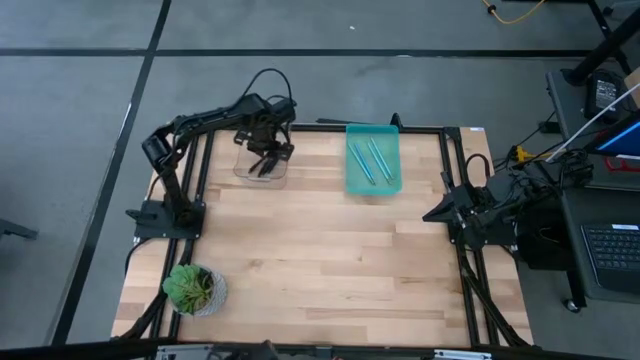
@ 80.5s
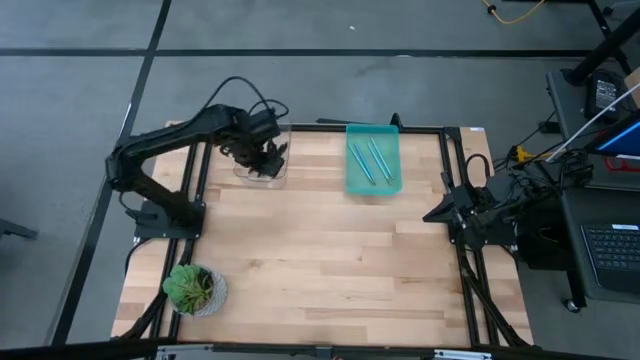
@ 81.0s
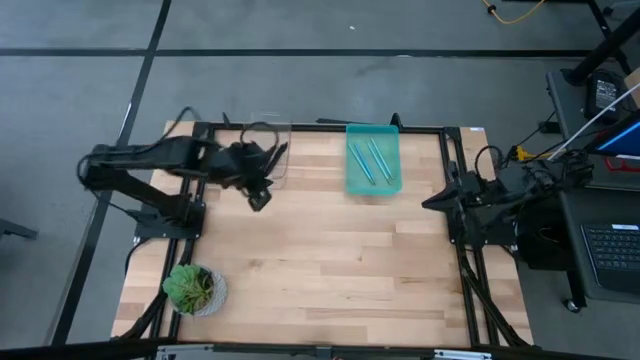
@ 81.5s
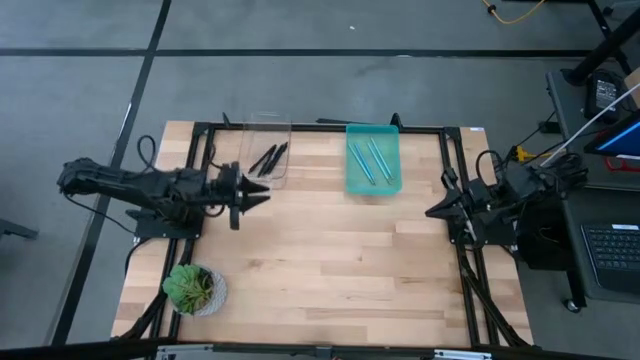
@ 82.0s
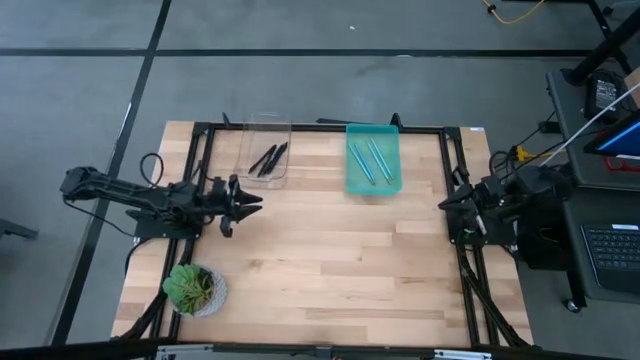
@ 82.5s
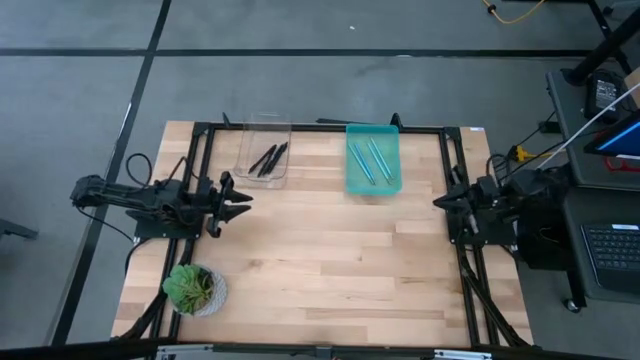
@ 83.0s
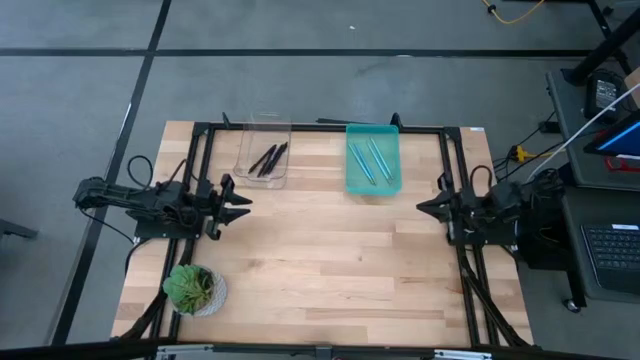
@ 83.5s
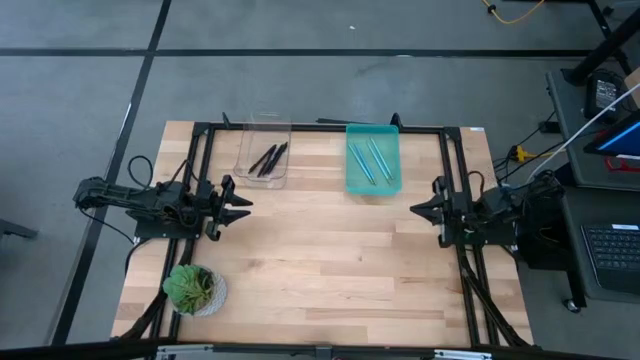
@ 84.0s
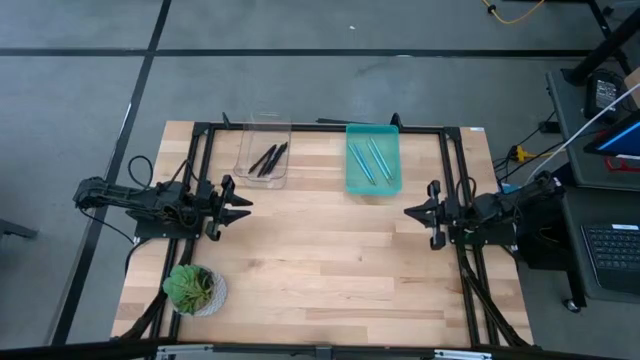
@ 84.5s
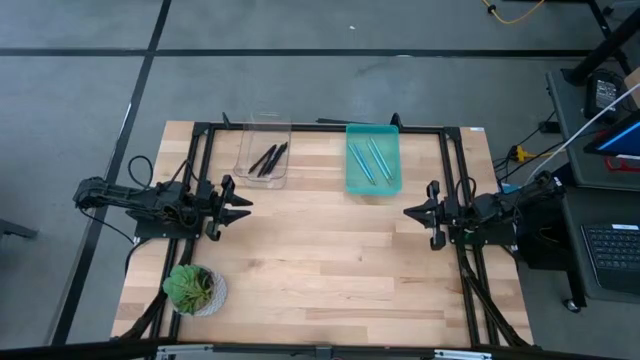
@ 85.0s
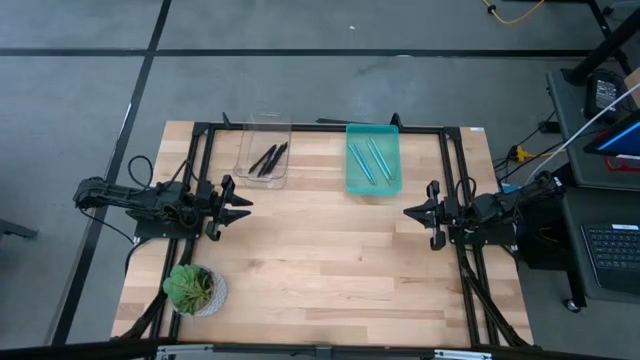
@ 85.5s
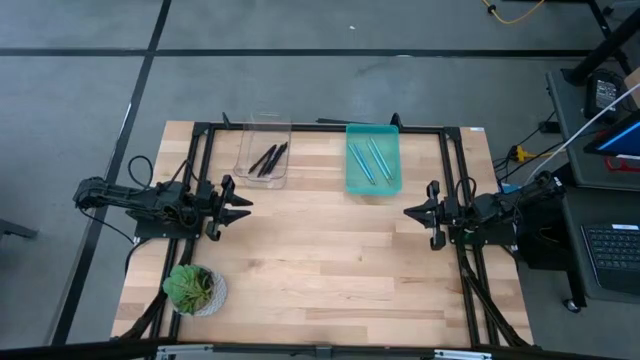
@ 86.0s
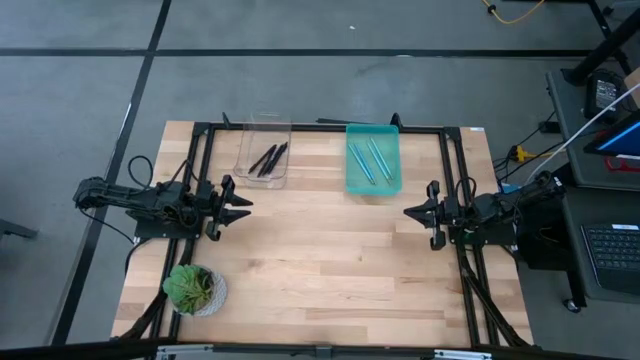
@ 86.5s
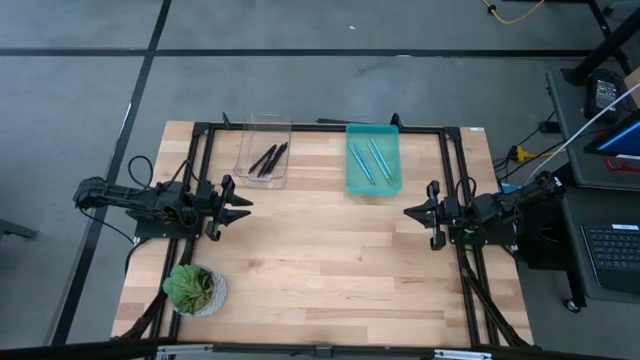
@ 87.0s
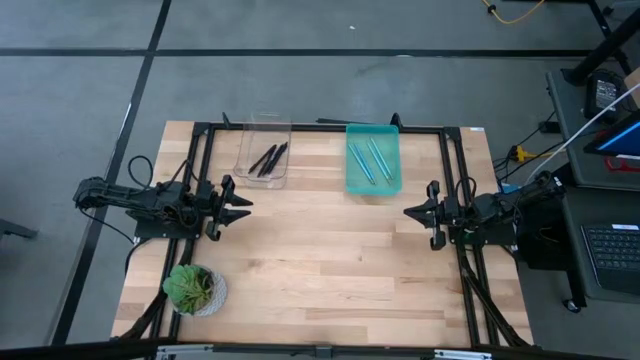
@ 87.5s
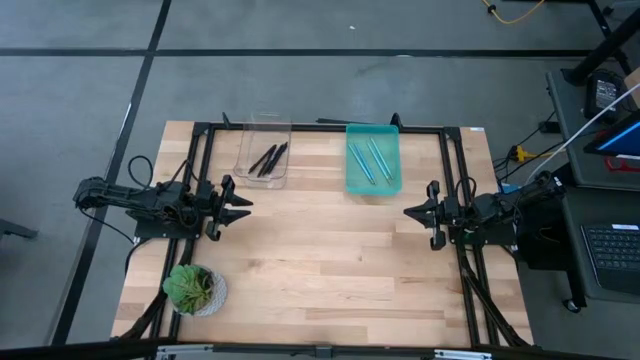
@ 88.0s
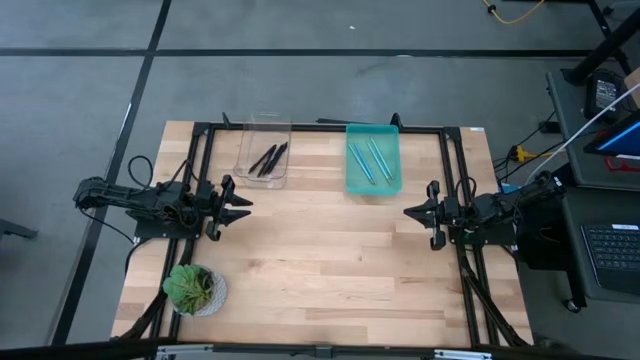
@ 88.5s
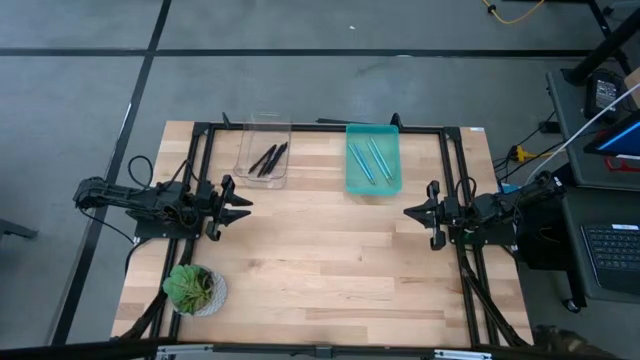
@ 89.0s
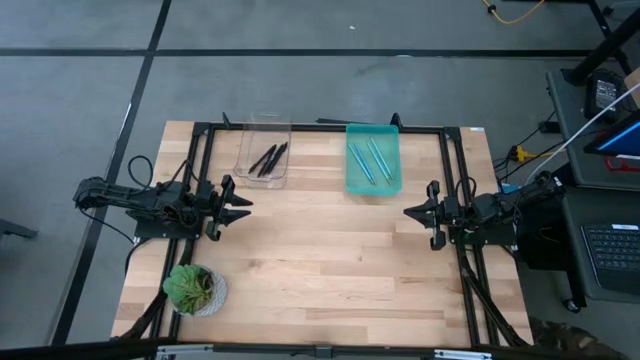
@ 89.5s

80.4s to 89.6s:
Task: Sort pens & pencils
Return to Home Position

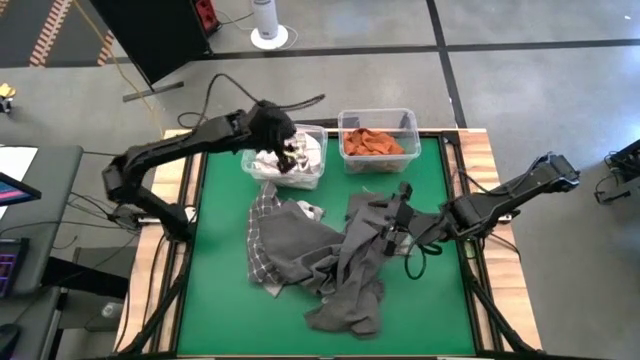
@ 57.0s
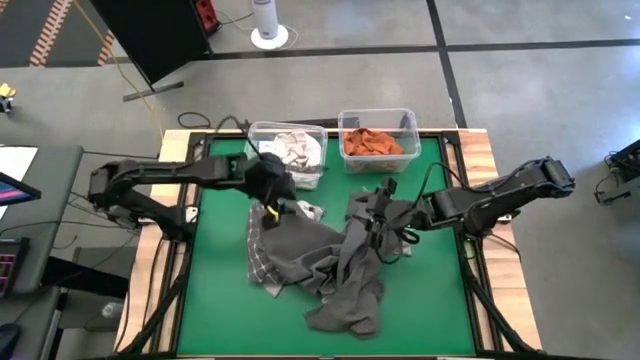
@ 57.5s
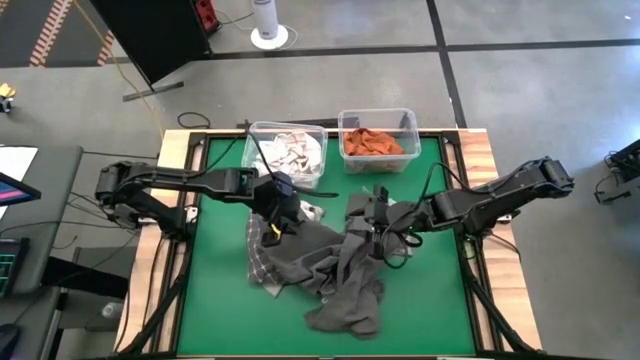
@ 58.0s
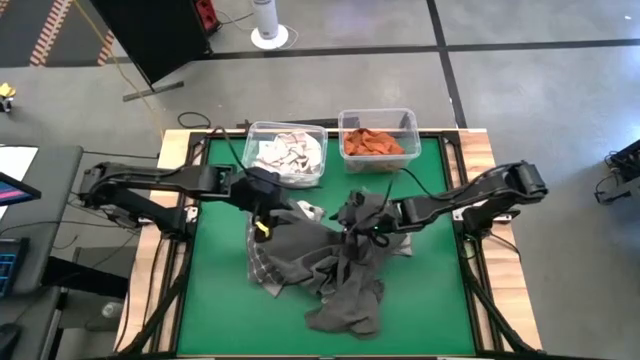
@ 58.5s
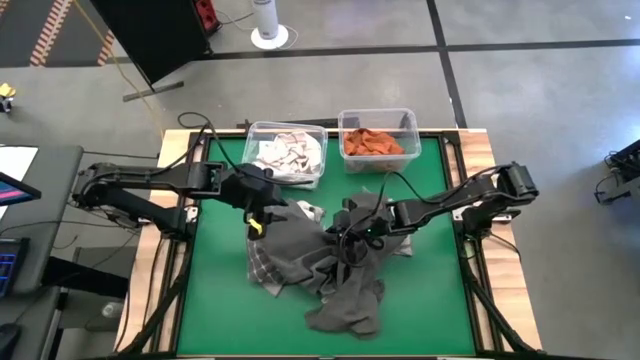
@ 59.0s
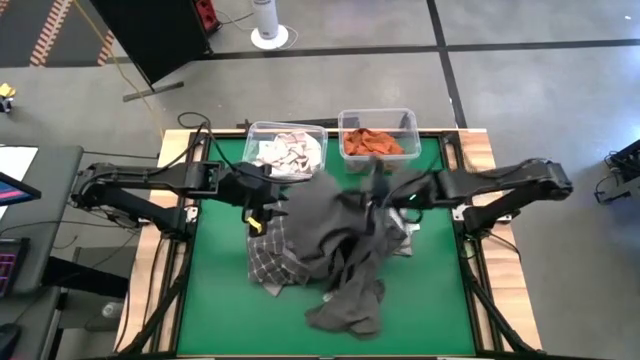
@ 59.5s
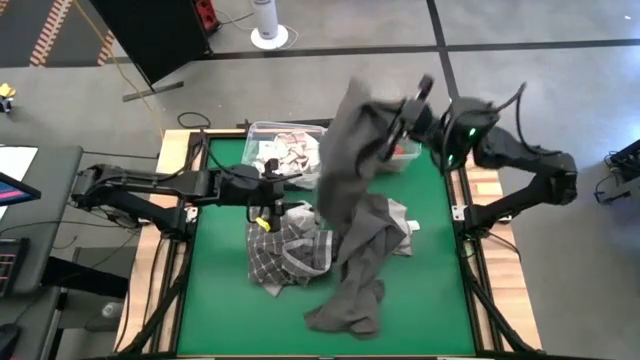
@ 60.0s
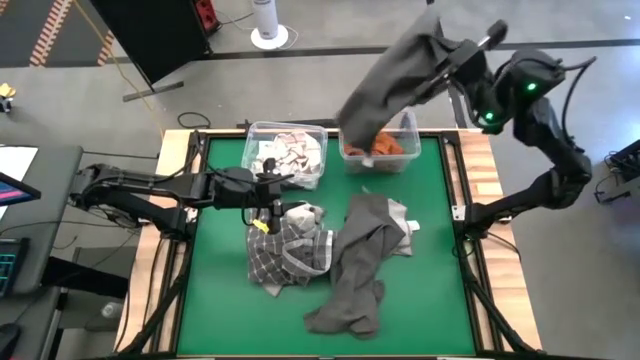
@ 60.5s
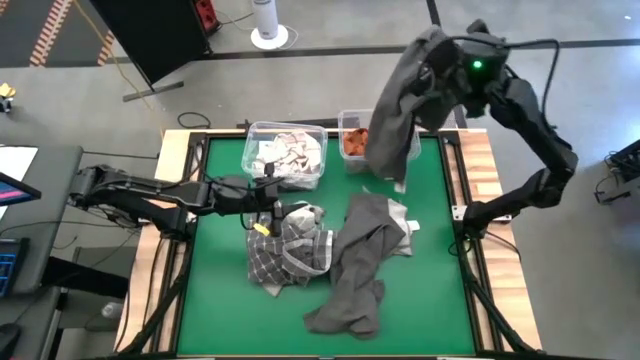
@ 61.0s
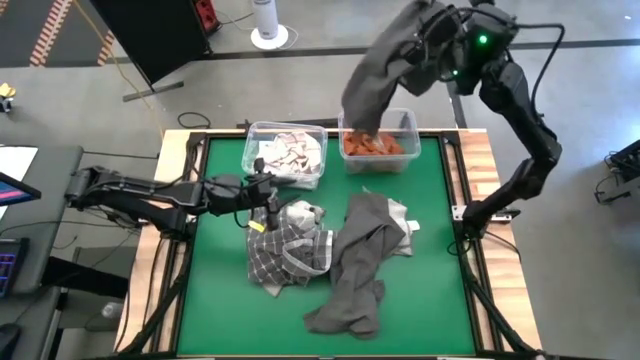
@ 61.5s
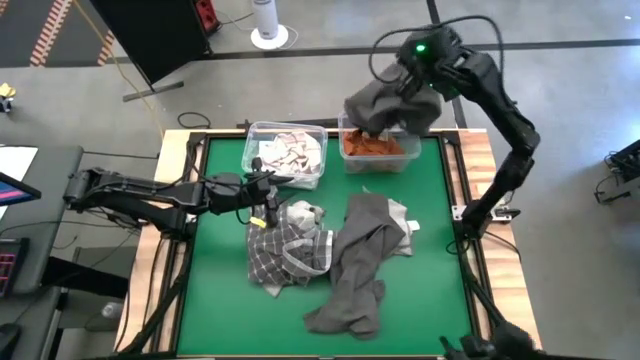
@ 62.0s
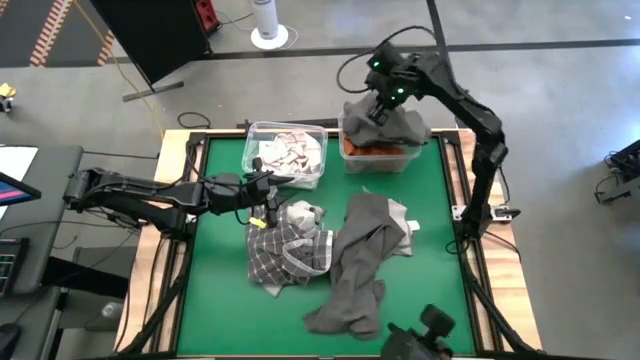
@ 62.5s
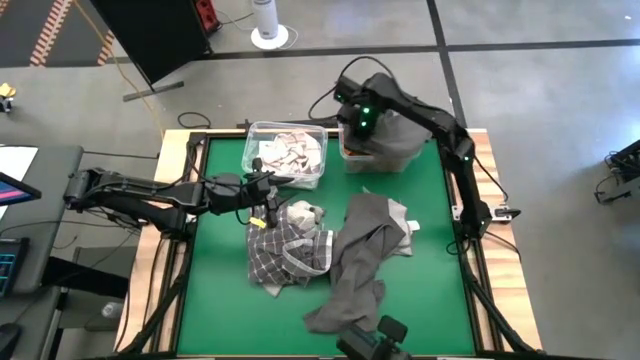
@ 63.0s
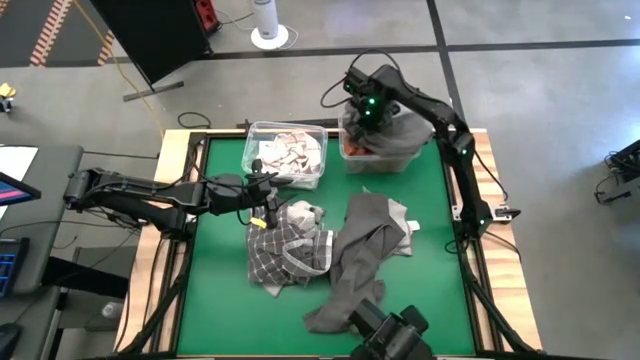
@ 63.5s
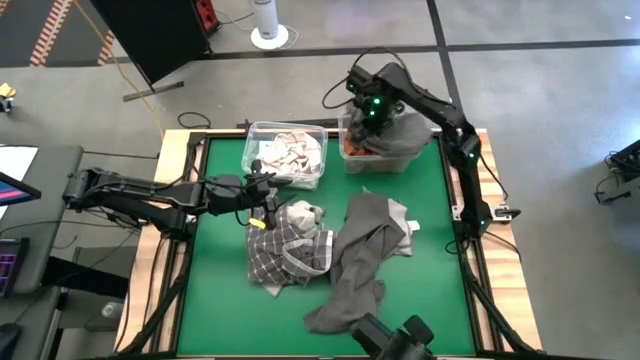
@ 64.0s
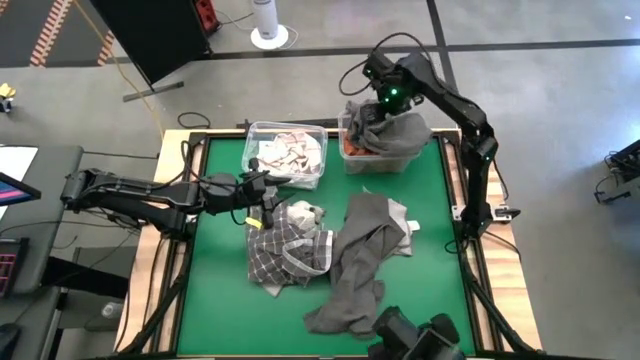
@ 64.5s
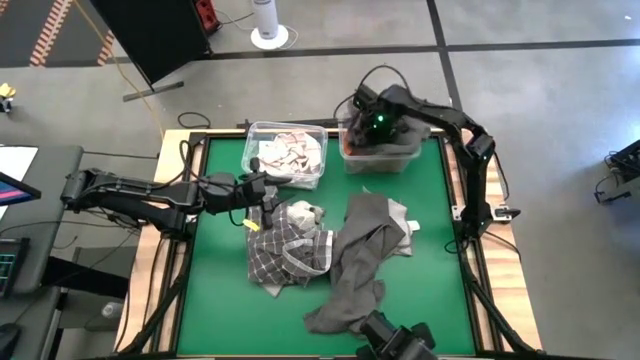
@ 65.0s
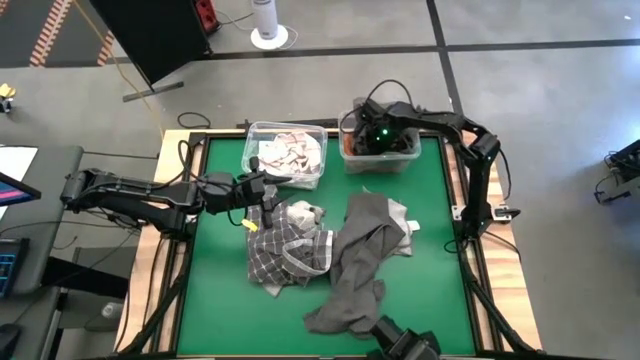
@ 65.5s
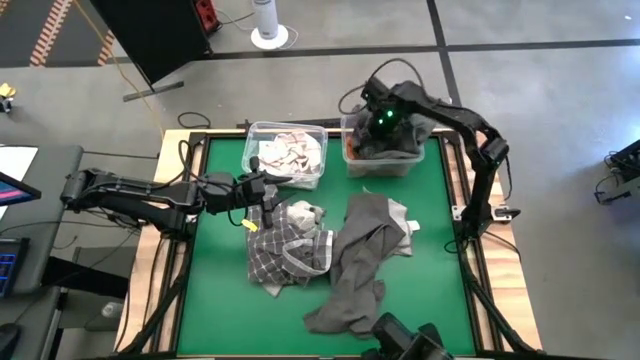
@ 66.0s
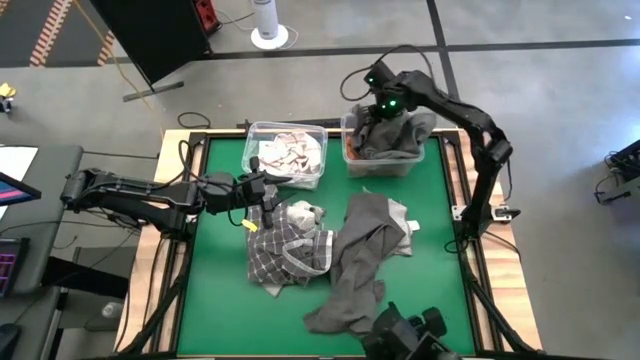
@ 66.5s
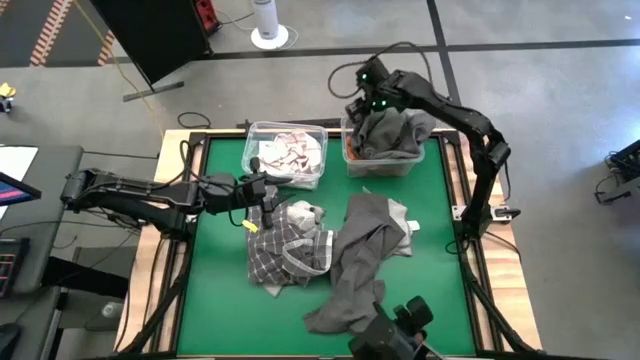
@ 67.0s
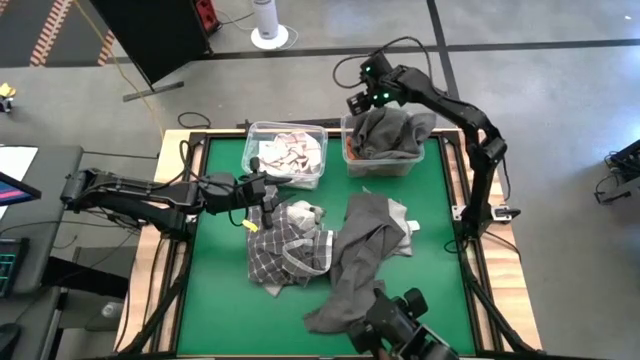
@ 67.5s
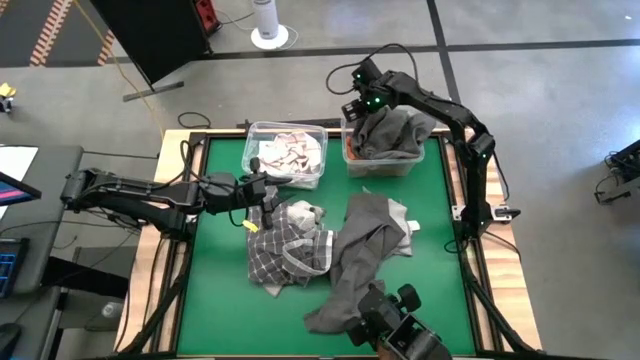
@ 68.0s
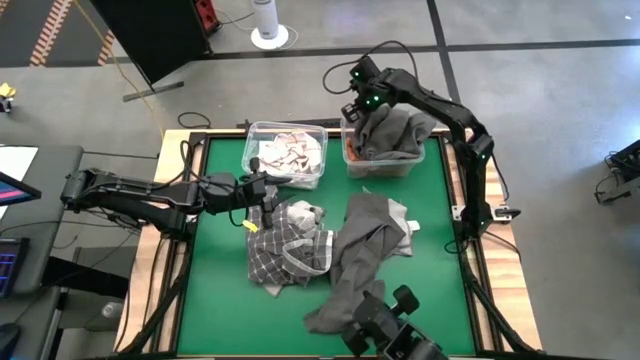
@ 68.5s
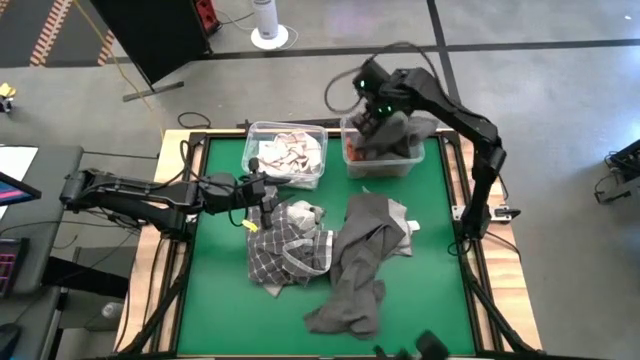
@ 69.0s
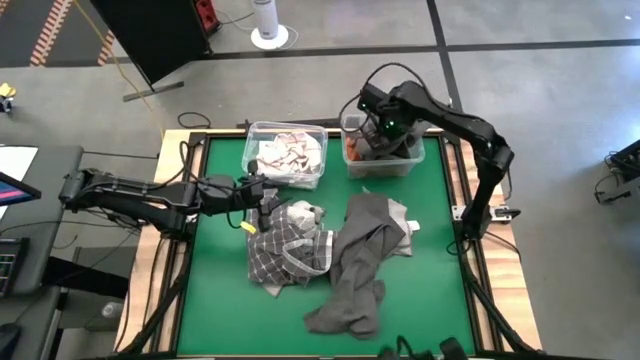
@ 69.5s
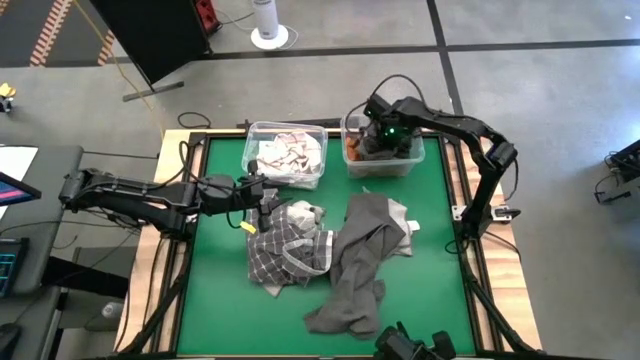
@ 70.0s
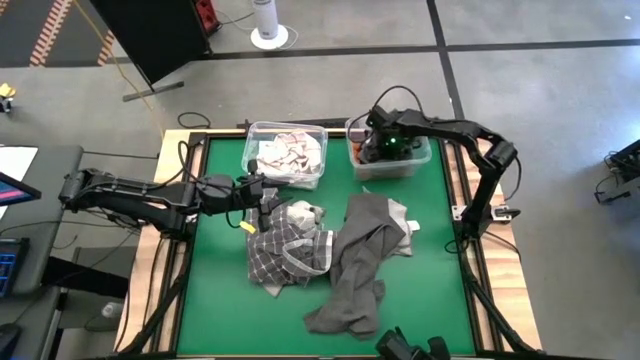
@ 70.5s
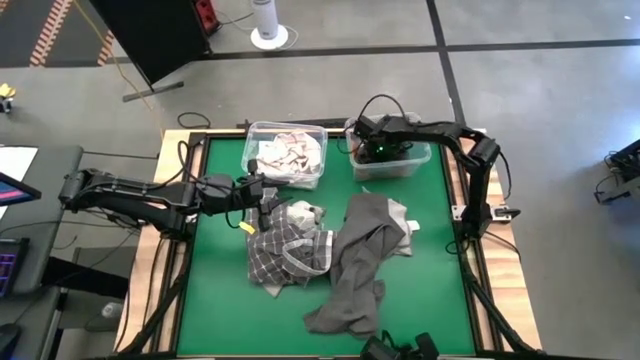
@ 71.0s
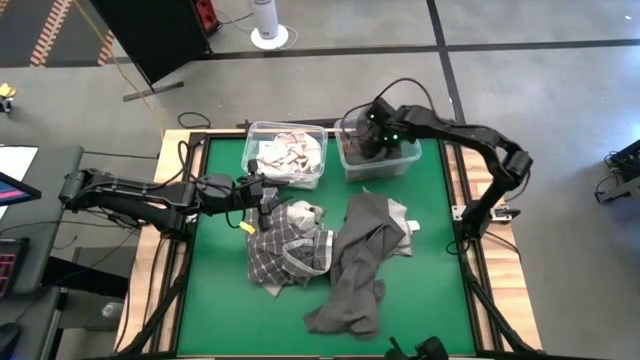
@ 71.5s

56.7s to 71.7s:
Task: Sort towels by color in basket
Put the gray microfiber towel into the right transparent bin
